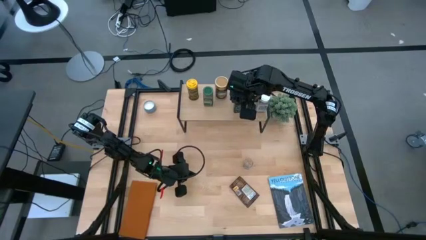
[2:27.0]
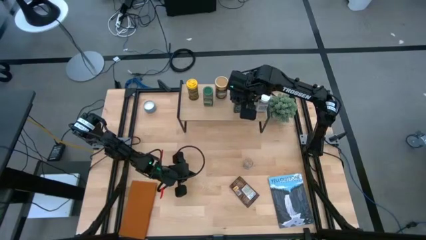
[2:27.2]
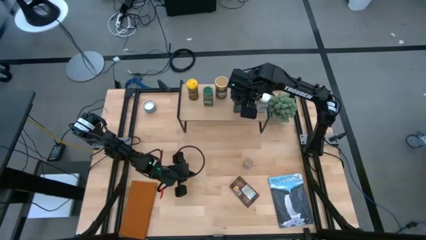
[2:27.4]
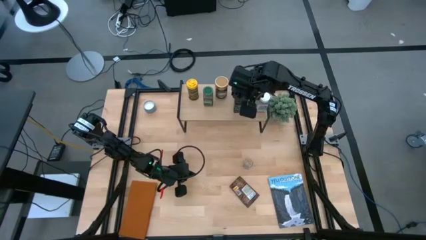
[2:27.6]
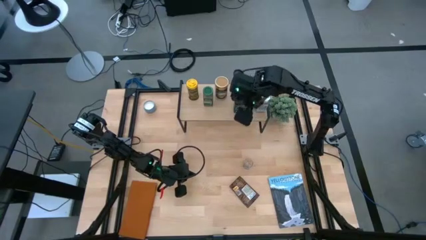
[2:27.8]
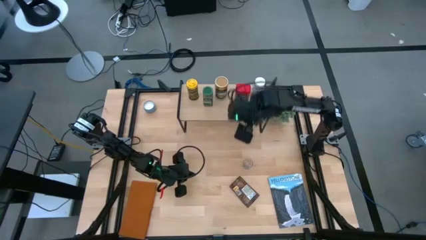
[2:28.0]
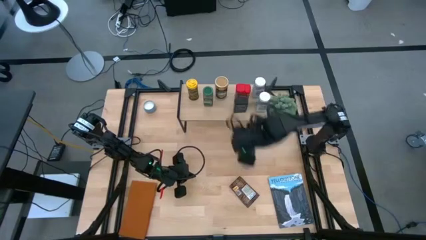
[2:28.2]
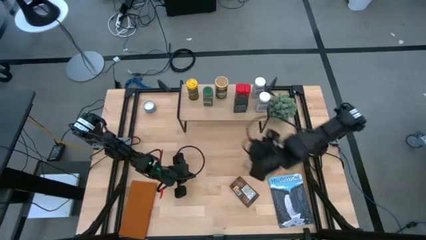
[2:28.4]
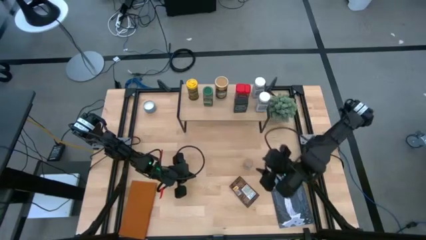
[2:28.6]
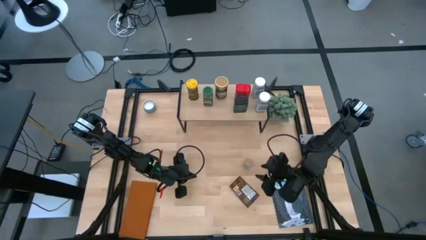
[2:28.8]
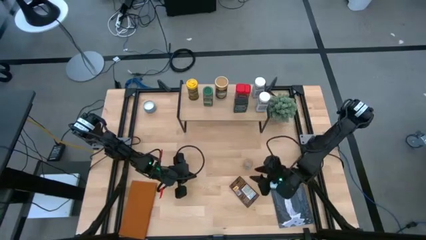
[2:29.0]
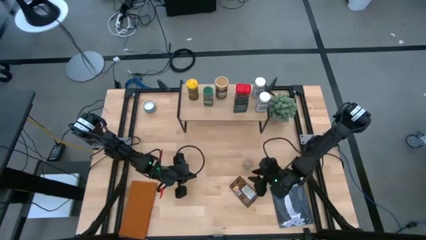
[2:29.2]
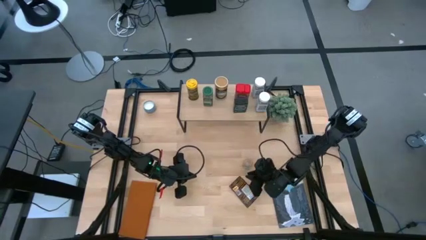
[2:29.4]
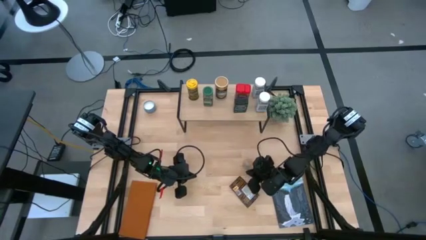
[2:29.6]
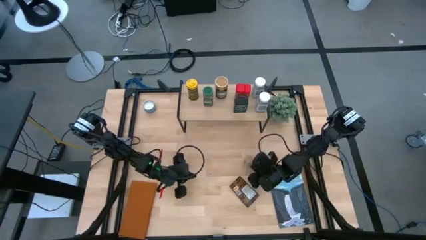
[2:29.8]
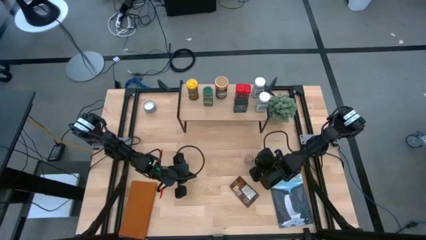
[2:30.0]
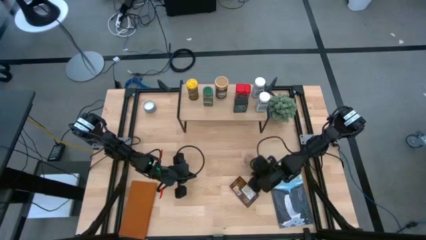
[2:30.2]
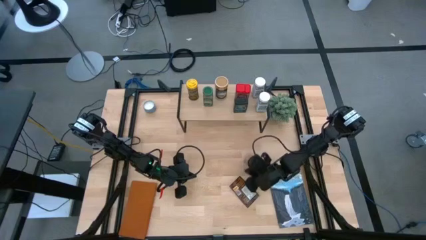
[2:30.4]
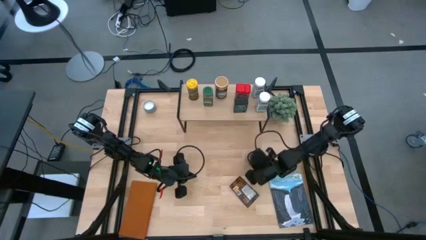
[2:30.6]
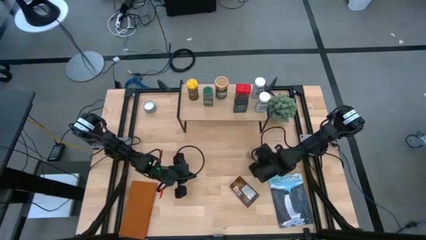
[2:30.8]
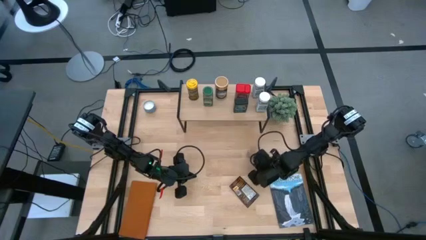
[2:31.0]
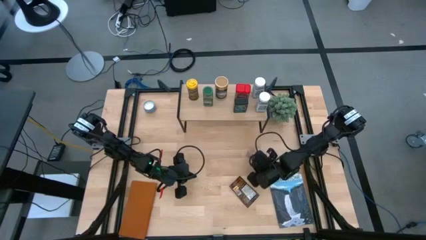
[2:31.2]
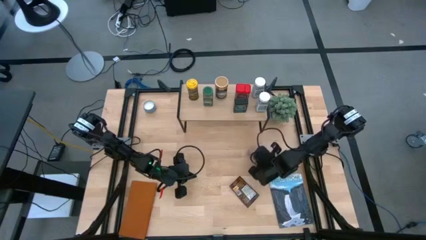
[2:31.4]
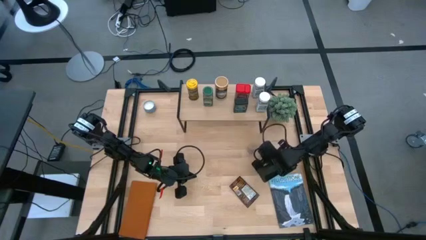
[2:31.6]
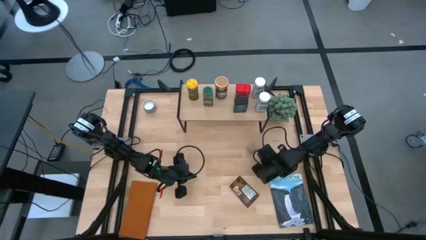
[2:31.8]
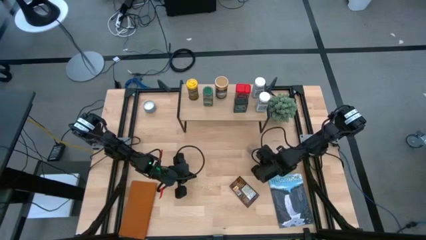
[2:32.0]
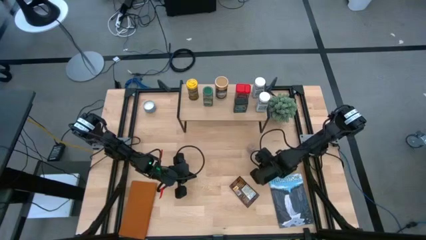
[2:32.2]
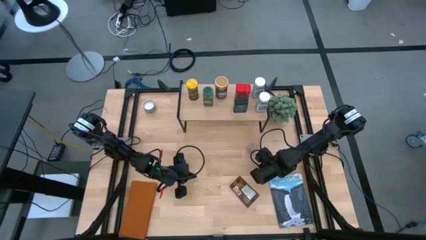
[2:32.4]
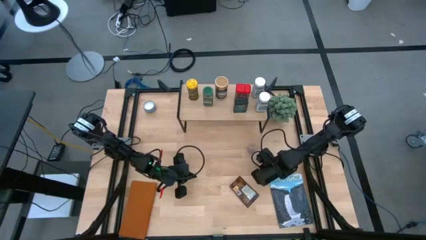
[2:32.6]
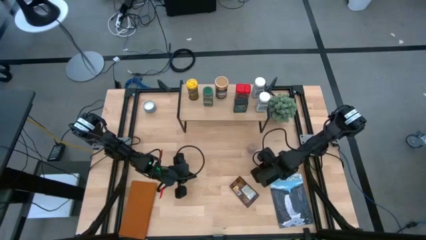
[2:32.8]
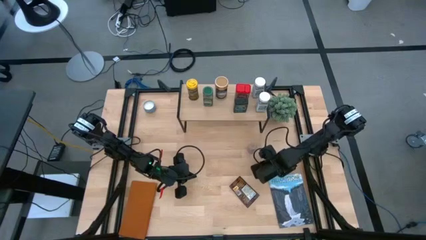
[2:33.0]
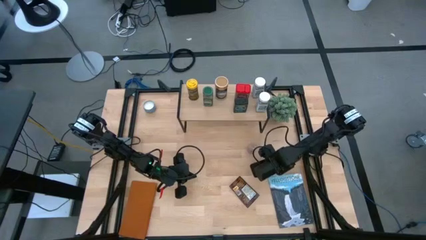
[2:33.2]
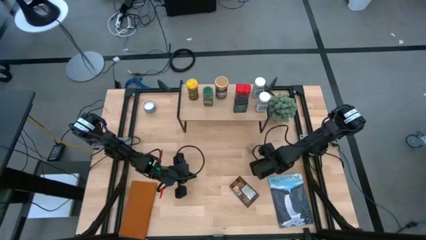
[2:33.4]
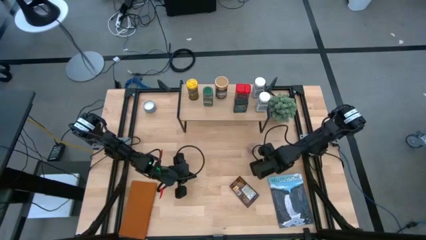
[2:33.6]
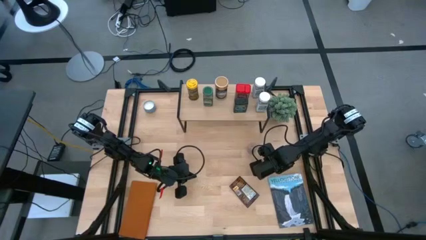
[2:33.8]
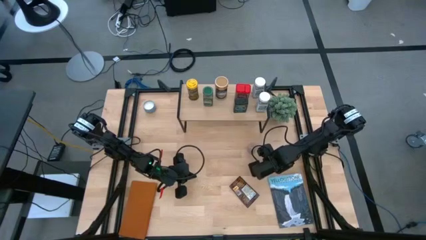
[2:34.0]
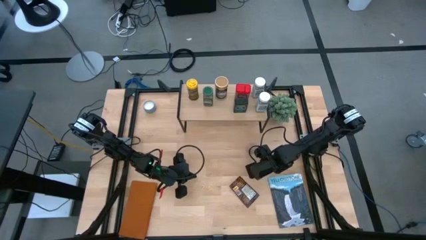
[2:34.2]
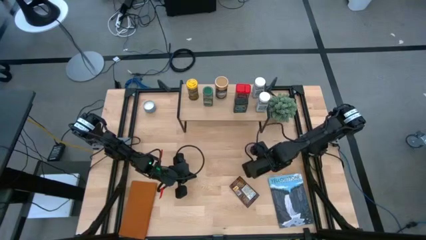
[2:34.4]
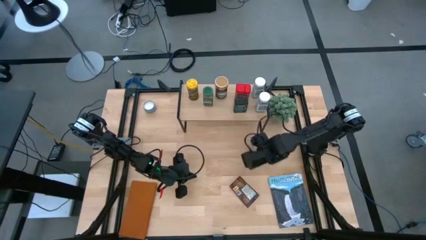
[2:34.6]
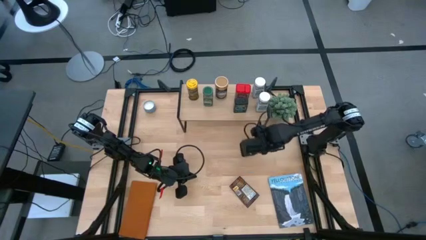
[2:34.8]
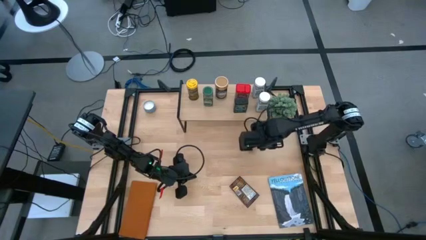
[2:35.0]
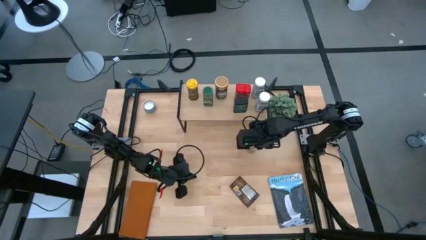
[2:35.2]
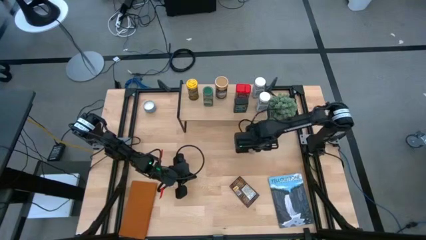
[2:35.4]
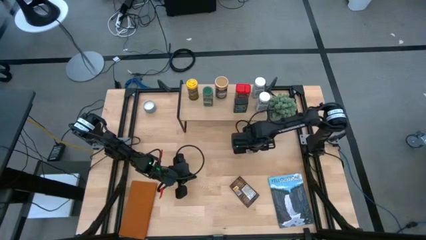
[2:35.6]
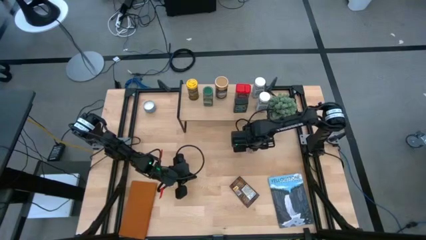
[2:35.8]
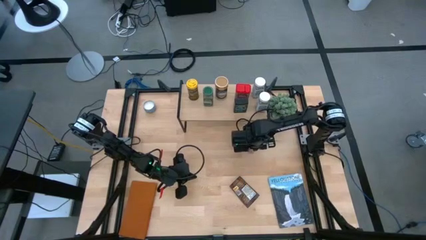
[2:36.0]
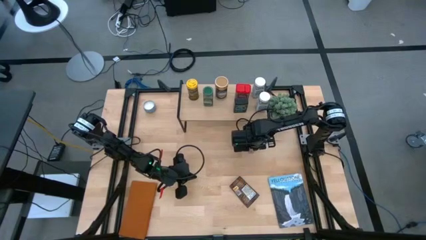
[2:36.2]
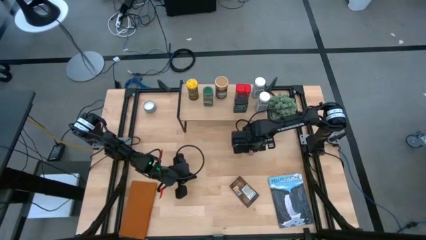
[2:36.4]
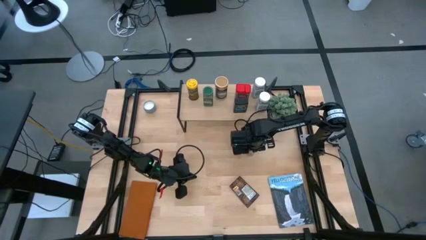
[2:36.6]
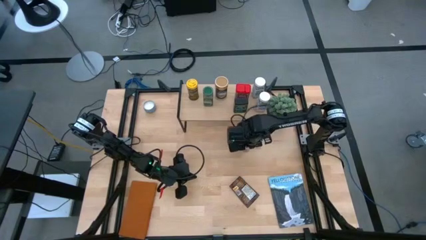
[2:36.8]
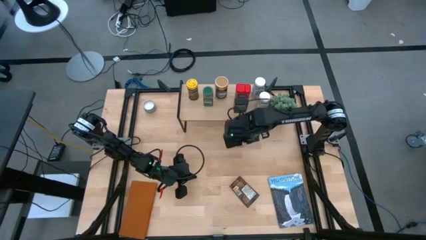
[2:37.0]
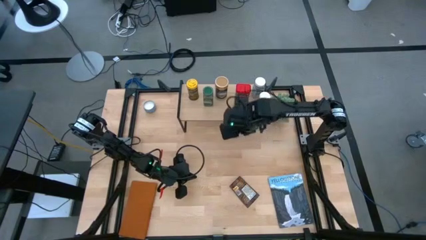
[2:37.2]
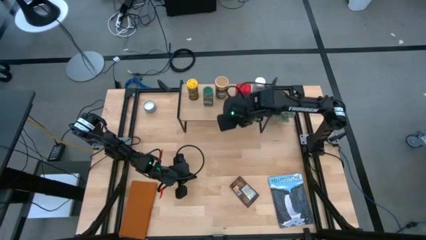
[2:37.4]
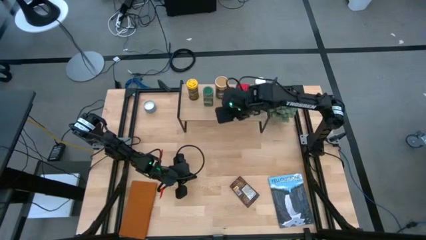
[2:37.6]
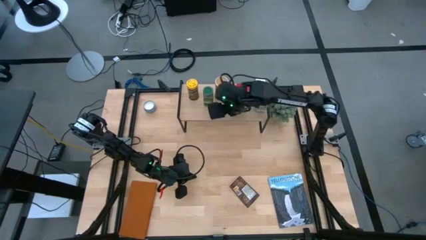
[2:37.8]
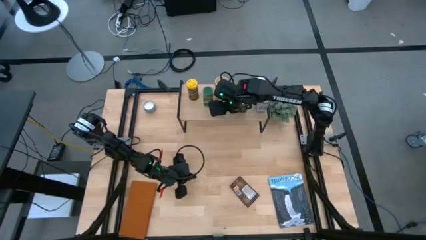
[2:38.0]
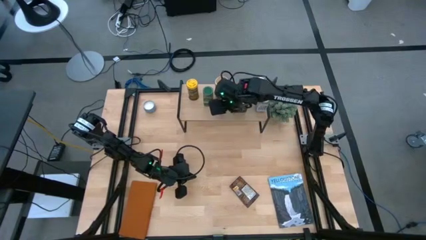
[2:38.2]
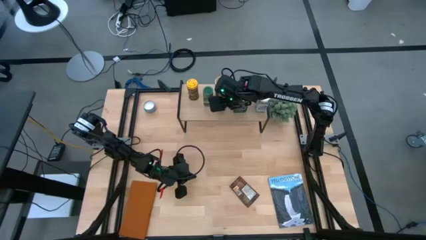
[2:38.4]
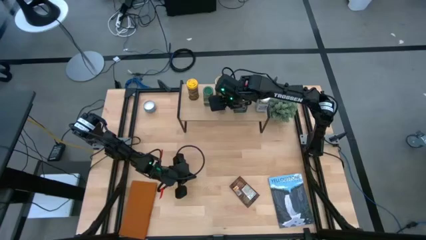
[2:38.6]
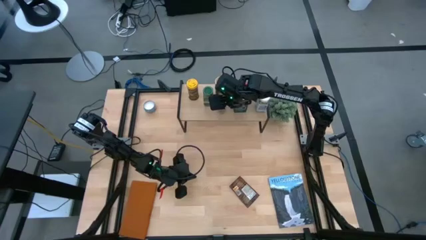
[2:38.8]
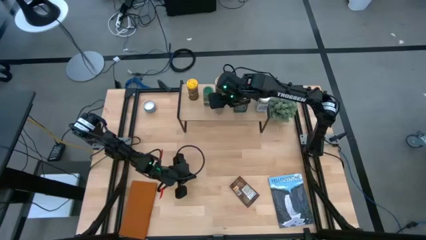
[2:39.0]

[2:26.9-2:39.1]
Task: Shelf spices
Put the transparent seasoning bottle on the shelf
